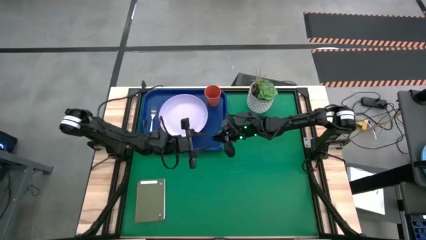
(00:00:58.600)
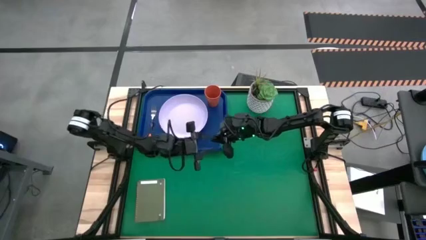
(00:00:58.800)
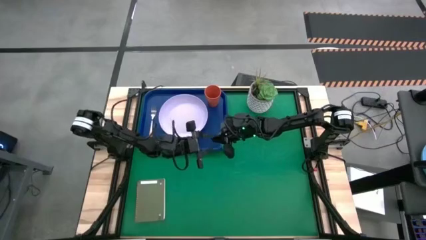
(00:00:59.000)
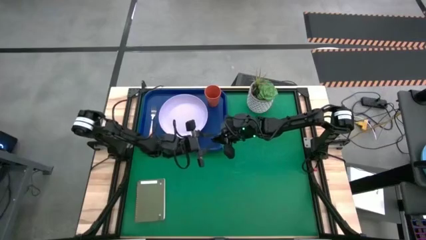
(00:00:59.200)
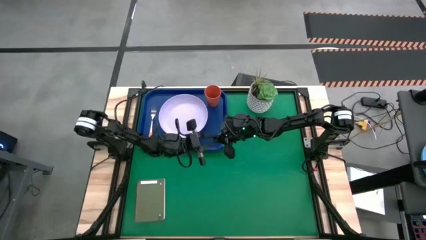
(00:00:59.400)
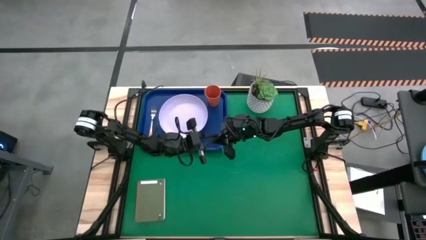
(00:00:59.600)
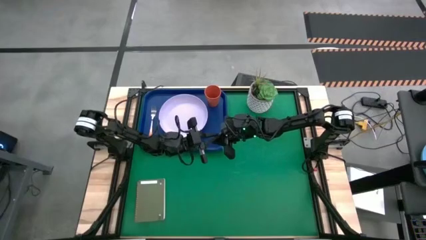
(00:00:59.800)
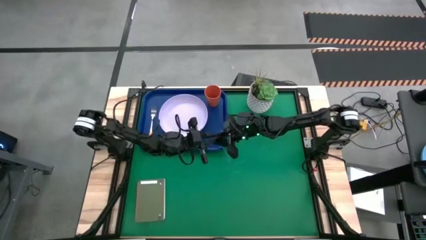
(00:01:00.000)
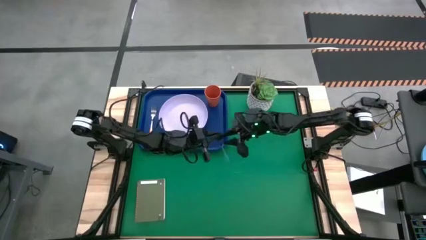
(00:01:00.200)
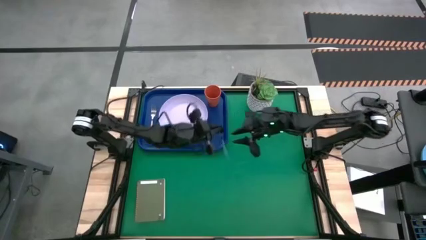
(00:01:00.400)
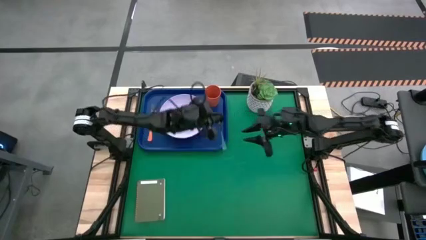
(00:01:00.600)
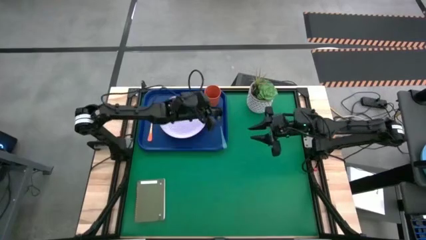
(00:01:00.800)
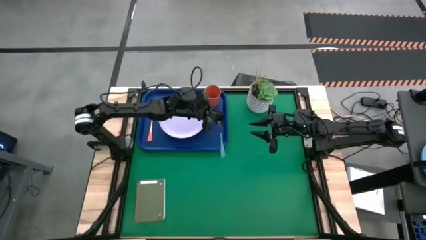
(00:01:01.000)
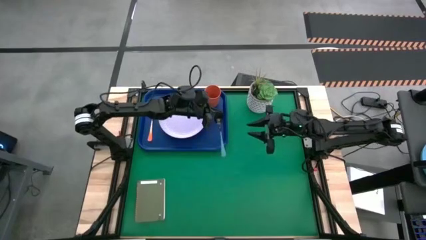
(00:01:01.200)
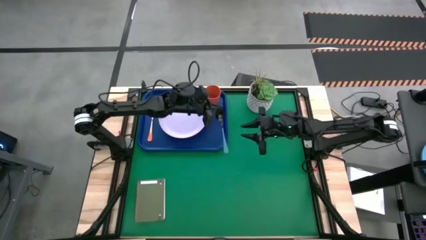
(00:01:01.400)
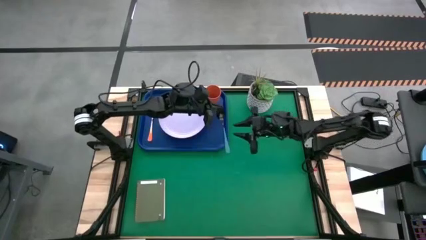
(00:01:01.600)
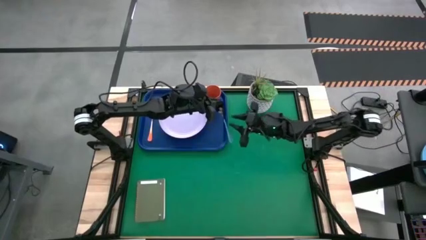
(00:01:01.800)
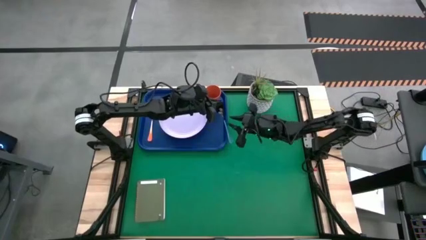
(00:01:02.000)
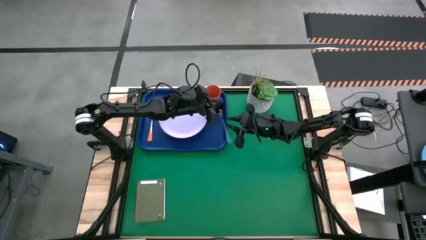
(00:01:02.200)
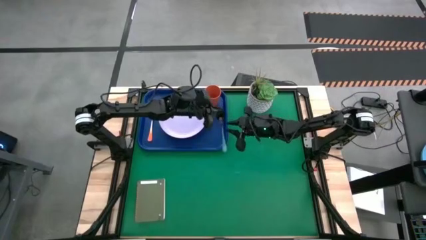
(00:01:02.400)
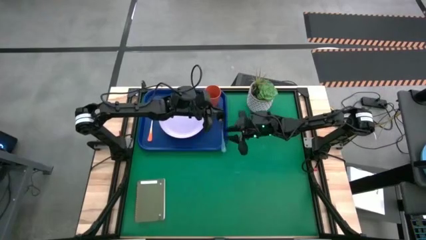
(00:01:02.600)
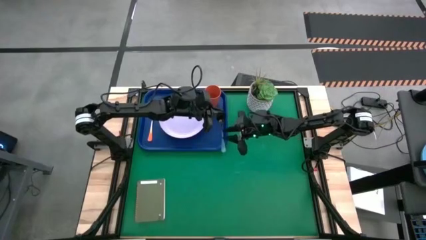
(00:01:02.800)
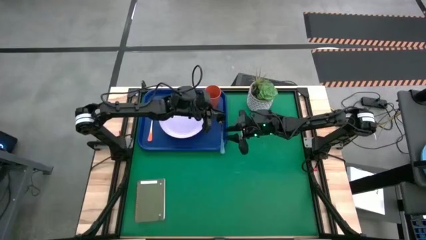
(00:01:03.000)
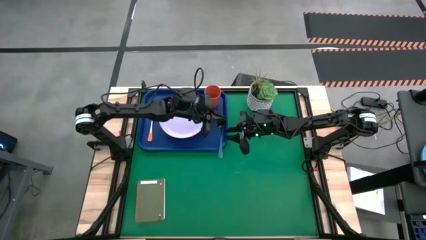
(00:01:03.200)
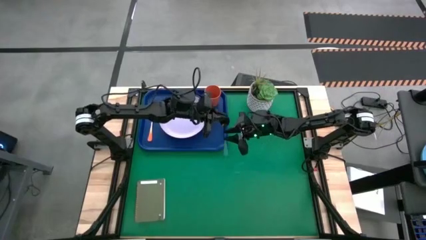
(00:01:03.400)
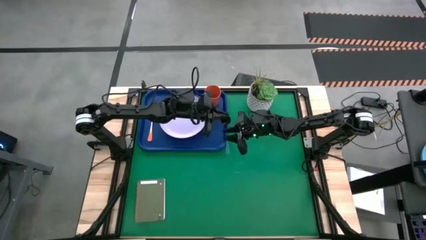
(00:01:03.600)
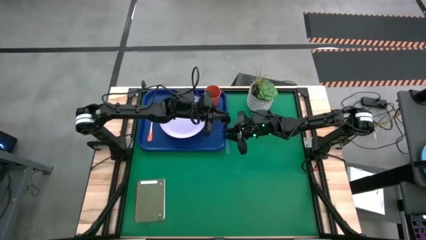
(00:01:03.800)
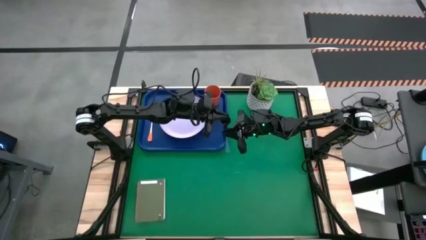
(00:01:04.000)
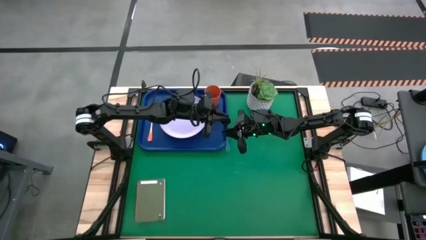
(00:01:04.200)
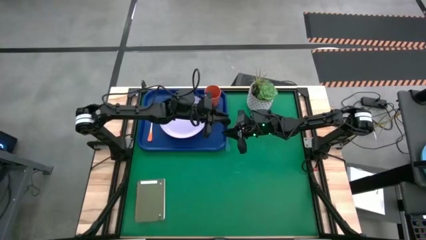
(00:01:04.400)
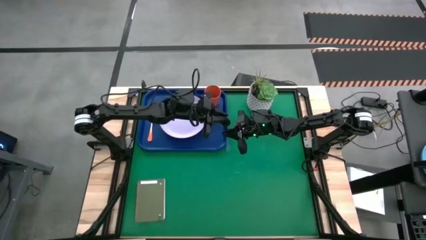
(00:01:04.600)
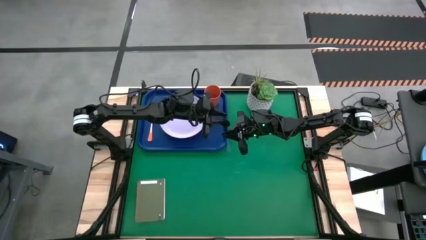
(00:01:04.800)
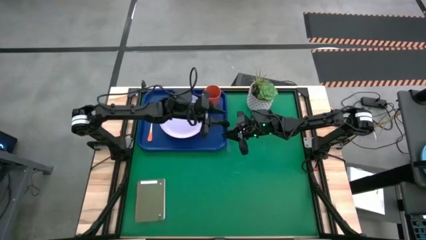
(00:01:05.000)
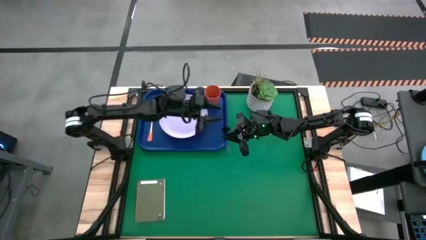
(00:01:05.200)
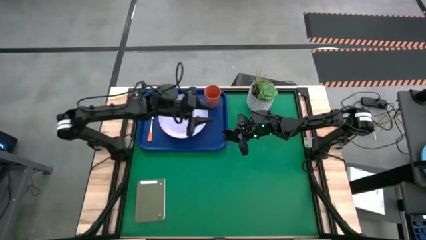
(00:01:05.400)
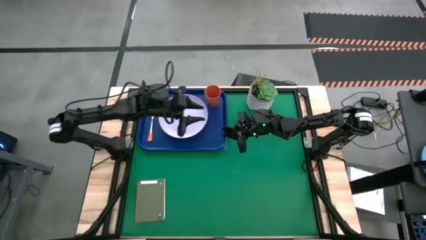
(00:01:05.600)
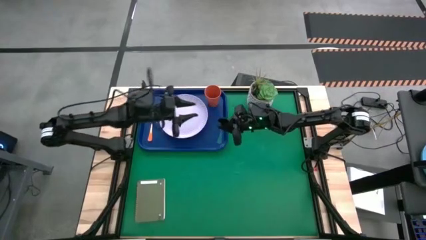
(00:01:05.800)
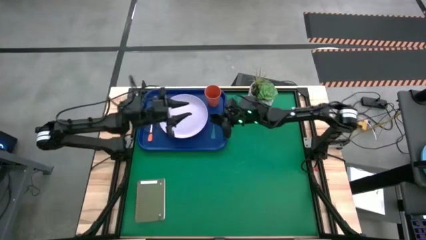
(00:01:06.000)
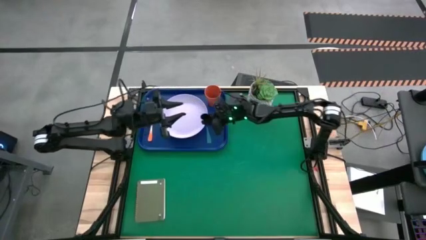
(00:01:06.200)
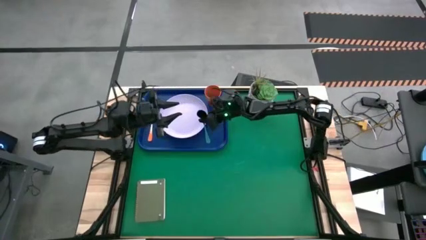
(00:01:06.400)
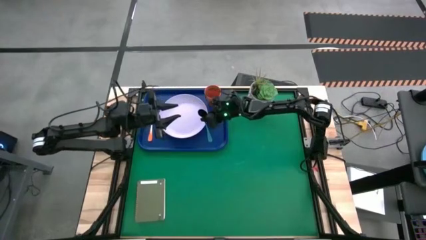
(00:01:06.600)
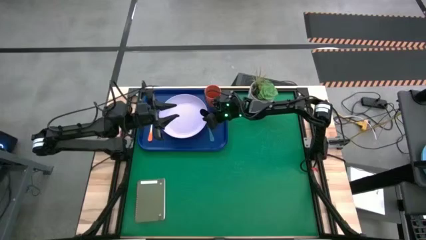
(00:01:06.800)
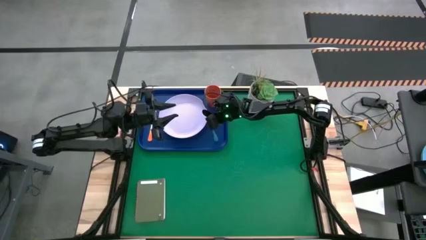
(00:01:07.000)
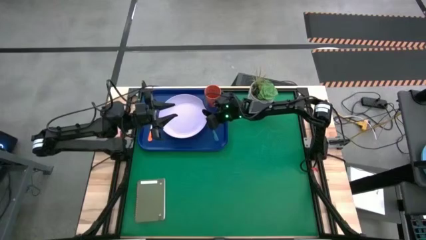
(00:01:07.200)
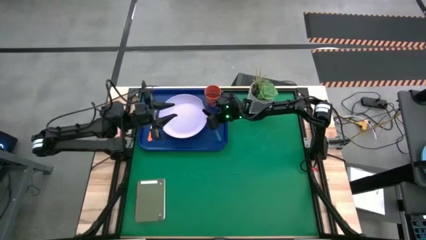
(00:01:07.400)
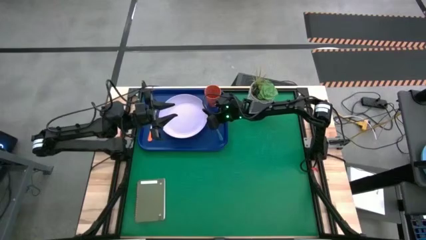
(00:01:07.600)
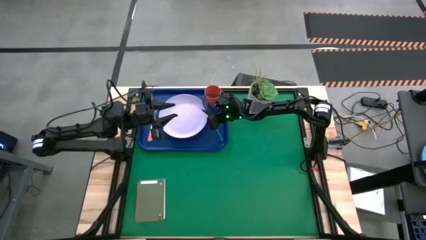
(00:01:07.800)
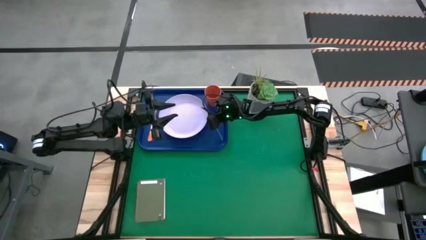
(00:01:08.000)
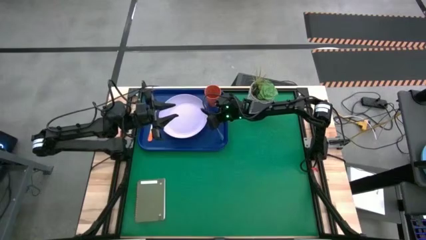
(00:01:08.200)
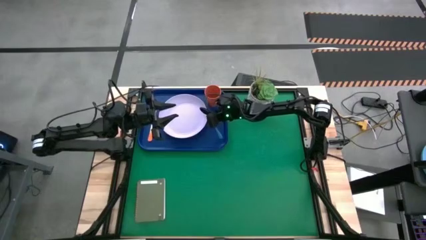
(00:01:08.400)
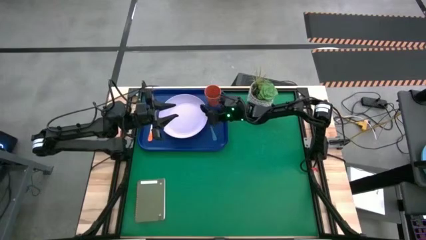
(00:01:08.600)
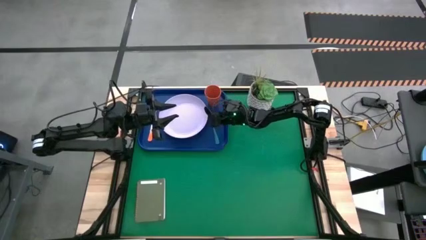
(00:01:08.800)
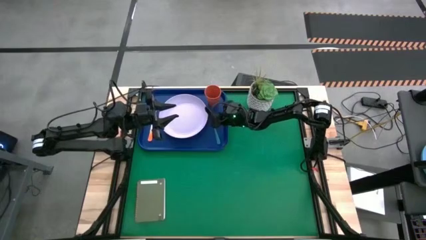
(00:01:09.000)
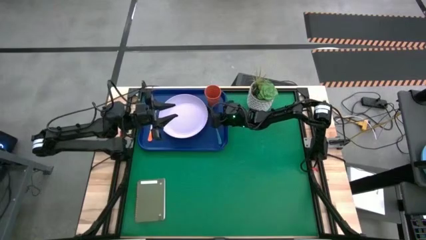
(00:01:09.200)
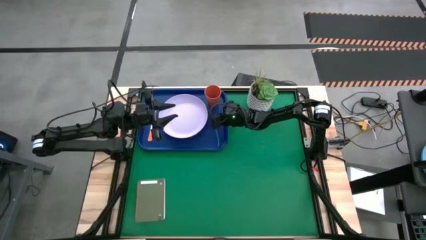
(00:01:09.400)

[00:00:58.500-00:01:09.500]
Task: Pick and place plate/cup/fork/spoon on tray
Put the blue spoon on the blue tray to the right of the white plate
